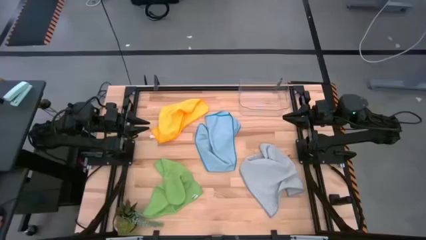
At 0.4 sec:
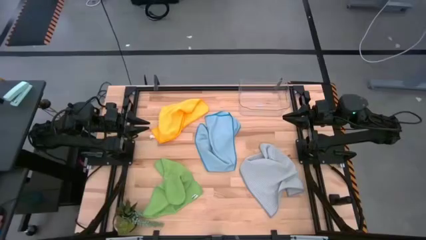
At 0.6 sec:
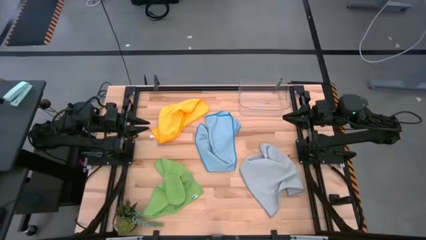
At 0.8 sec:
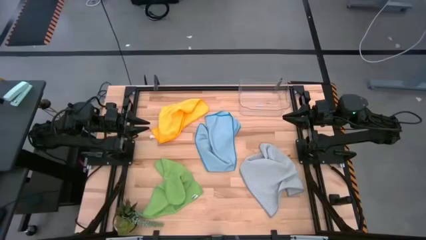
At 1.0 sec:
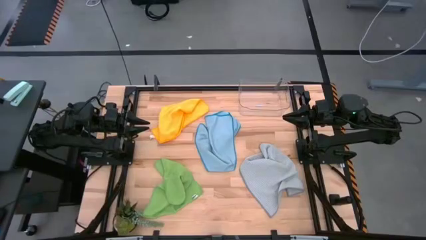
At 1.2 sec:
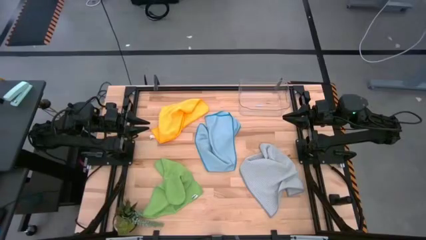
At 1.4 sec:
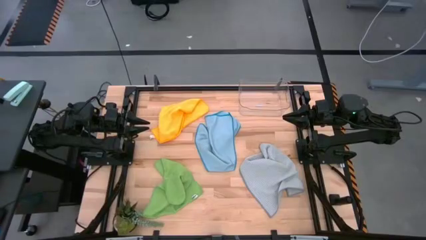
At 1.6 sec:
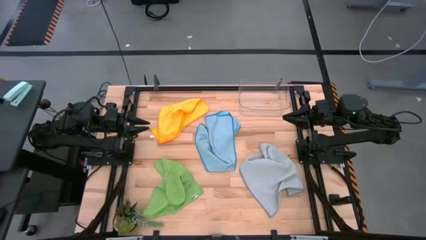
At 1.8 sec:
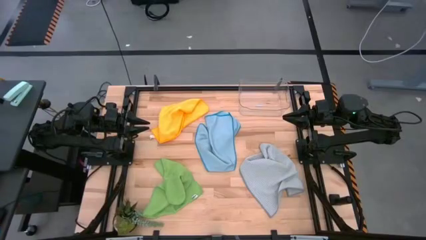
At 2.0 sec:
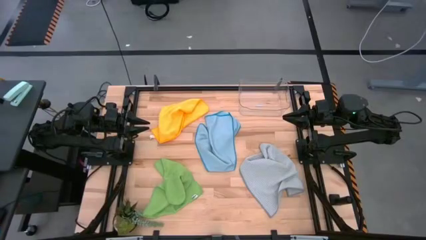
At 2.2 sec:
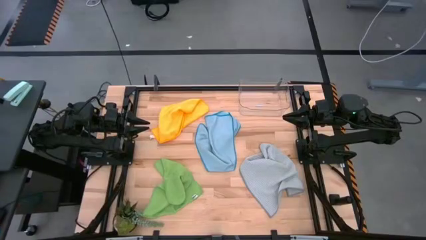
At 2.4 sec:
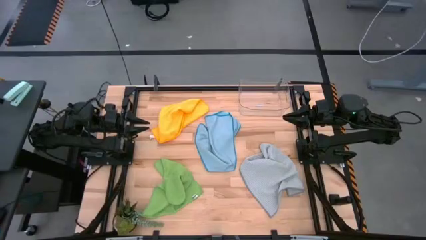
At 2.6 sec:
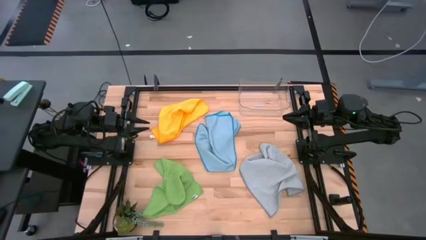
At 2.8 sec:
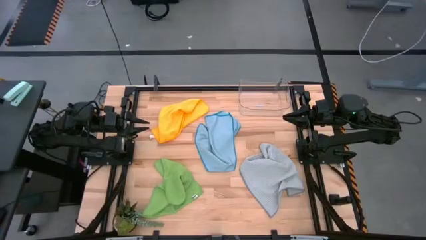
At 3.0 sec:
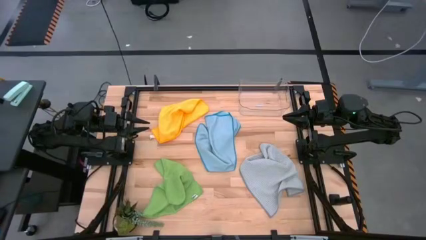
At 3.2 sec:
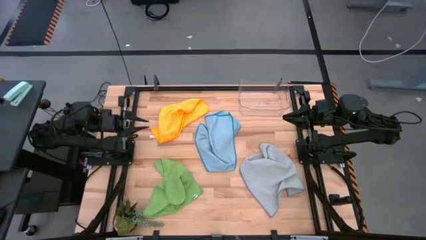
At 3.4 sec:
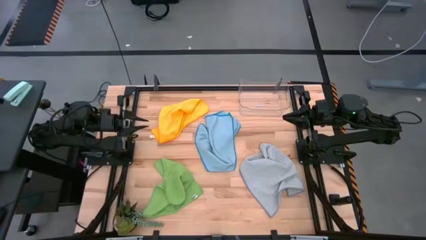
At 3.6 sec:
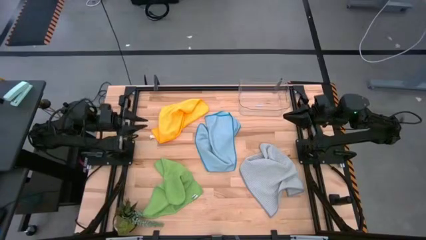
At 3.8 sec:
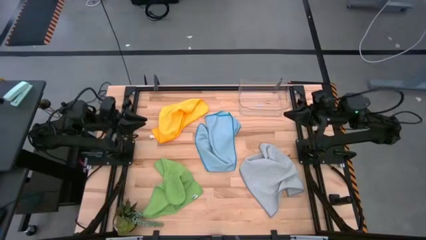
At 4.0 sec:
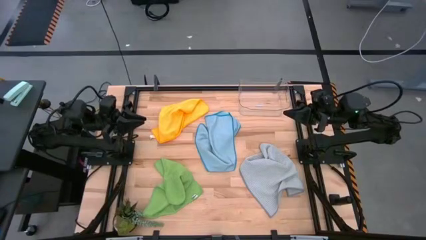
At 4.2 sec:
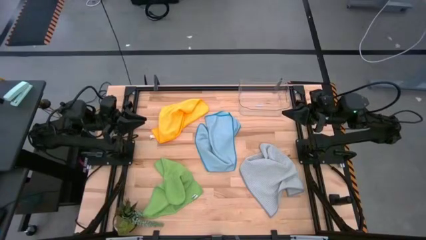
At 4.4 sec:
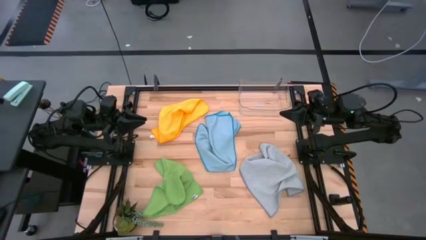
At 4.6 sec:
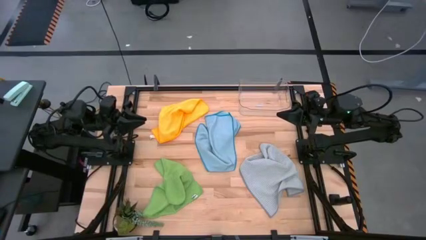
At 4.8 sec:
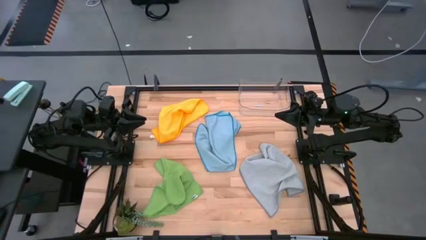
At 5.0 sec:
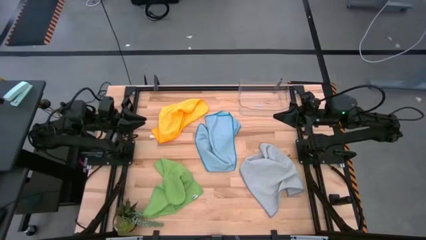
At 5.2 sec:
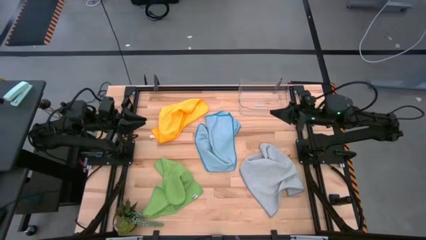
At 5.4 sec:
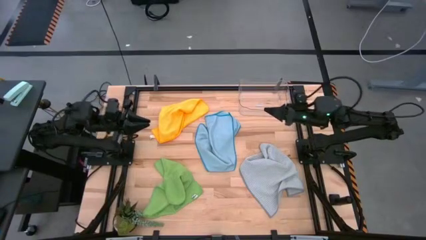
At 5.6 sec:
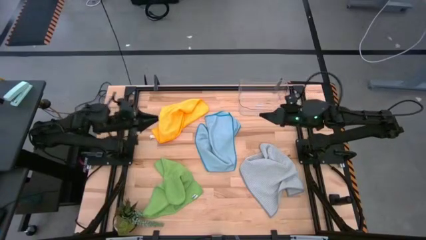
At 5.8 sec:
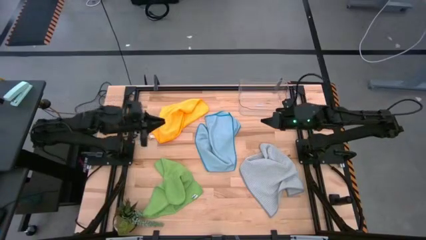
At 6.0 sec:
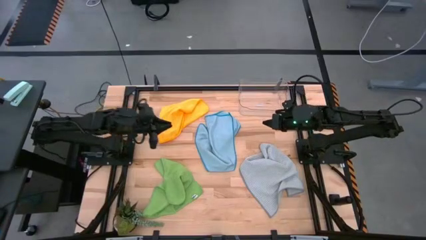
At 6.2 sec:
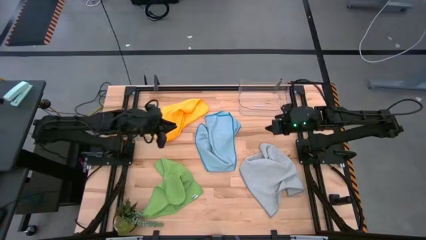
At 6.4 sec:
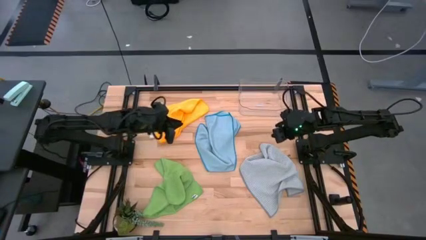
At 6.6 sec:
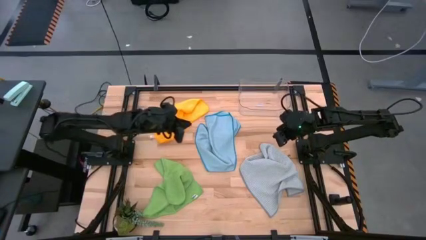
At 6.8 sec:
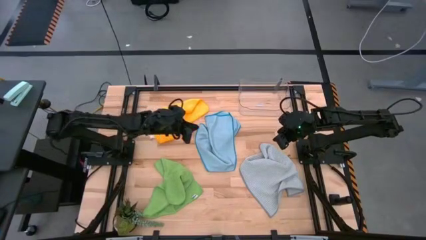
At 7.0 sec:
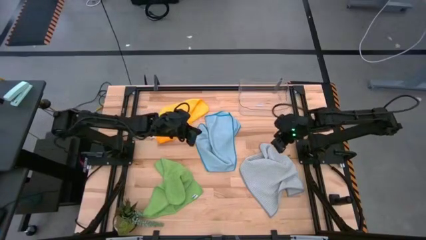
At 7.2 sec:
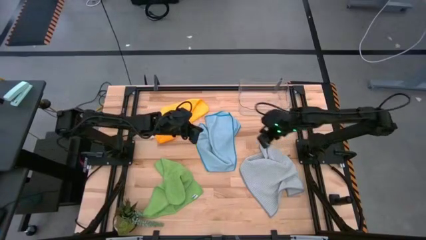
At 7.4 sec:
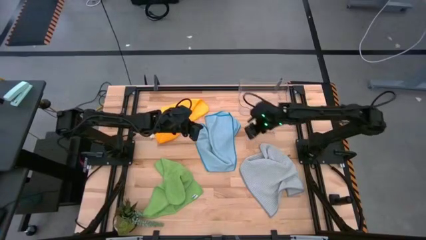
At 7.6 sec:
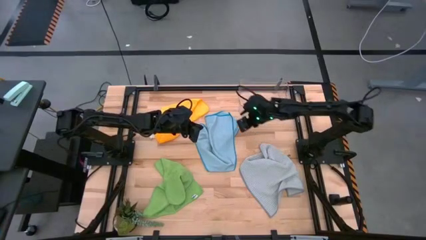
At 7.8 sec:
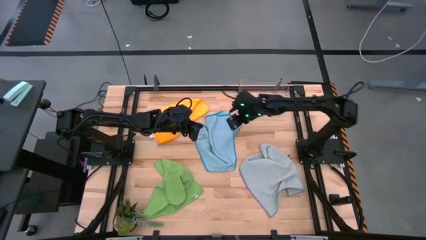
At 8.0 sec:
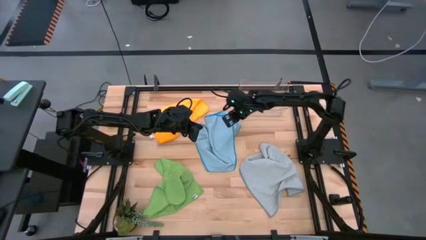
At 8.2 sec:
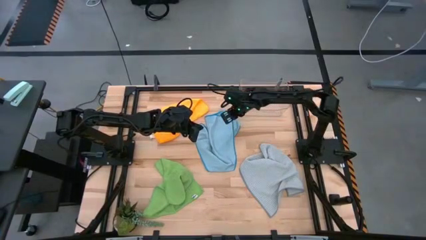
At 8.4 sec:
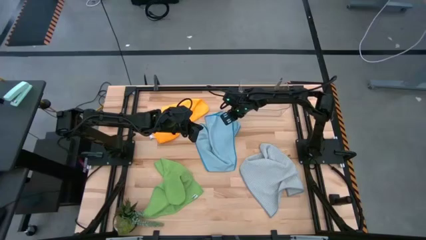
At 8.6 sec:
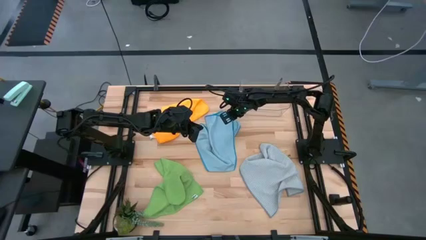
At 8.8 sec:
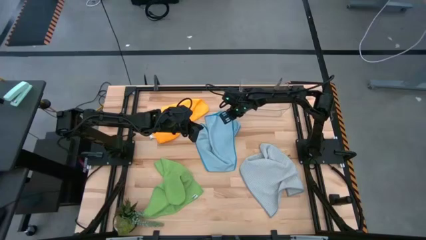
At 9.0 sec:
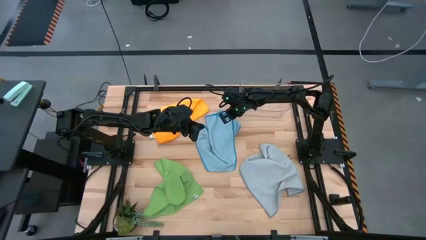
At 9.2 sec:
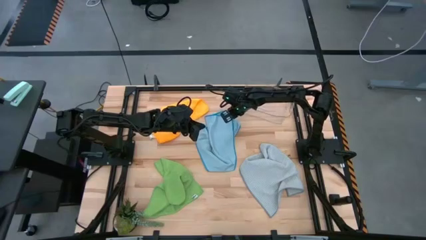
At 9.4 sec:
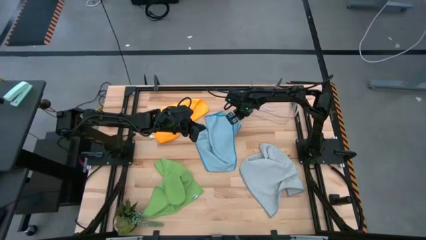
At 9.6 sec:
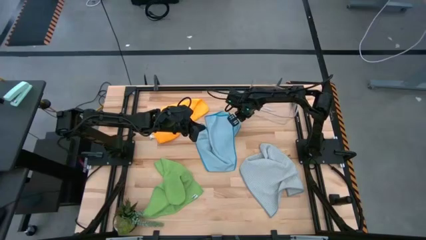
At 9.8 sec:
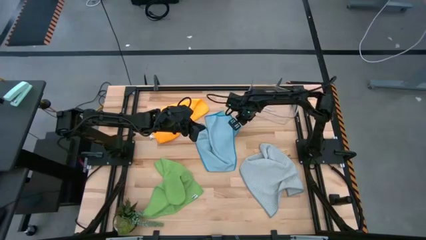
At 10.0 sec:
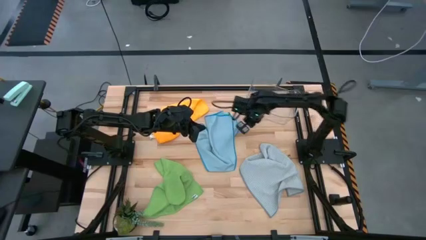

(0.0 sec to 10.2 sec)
Task: Fold microfiber towels
Fold the blue microfiber cloth
